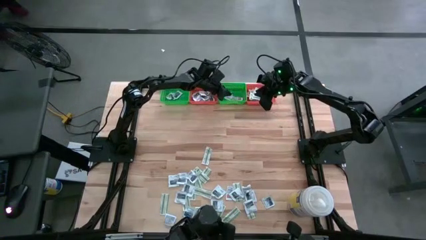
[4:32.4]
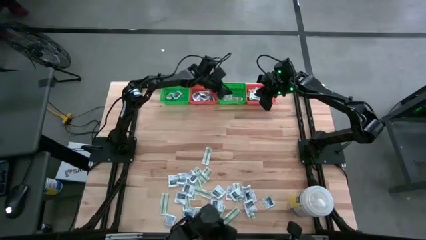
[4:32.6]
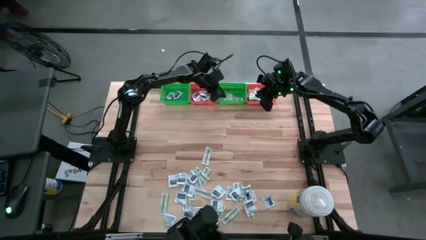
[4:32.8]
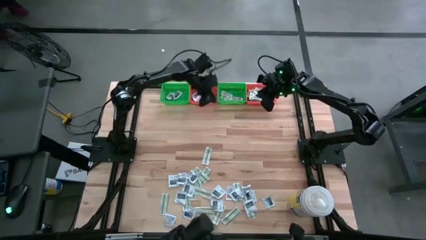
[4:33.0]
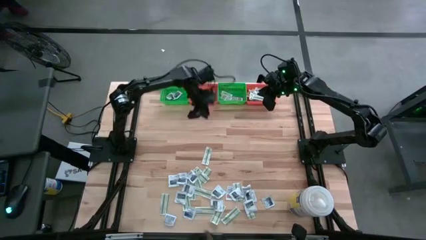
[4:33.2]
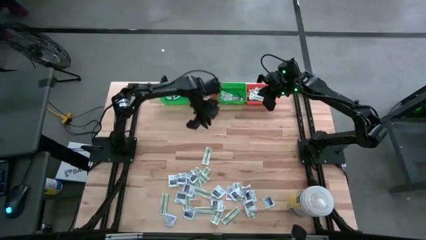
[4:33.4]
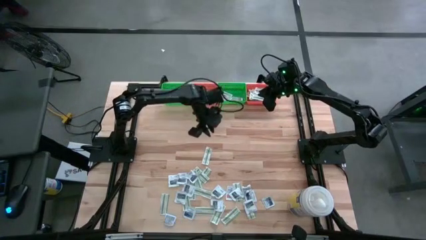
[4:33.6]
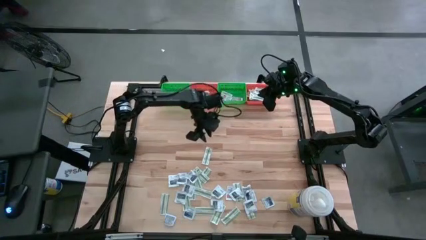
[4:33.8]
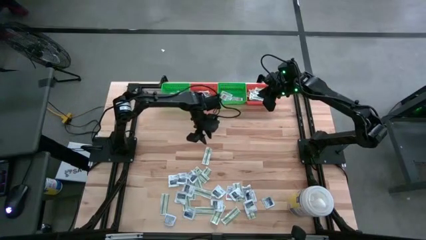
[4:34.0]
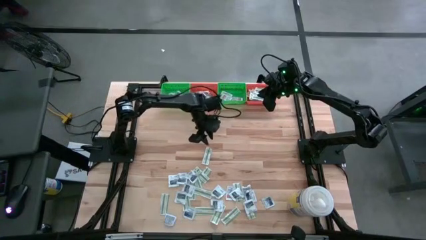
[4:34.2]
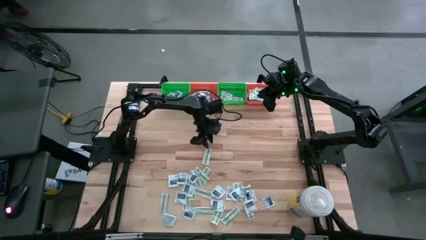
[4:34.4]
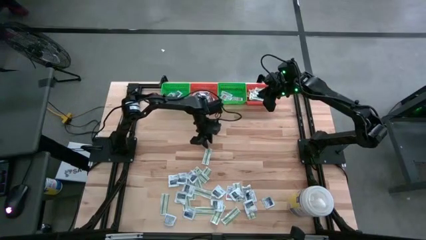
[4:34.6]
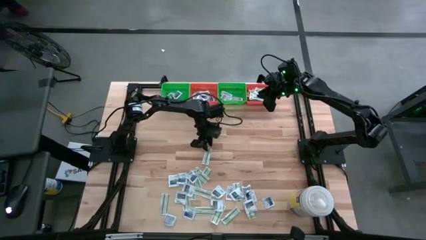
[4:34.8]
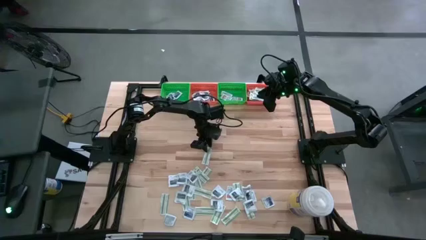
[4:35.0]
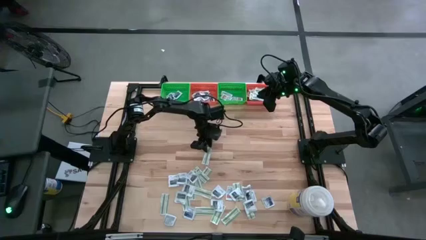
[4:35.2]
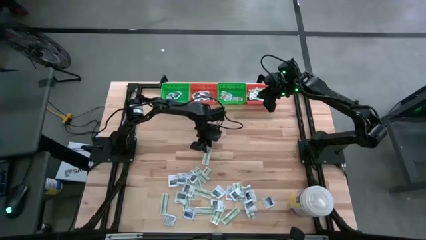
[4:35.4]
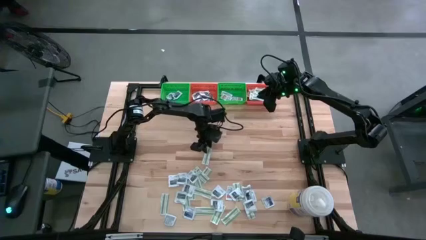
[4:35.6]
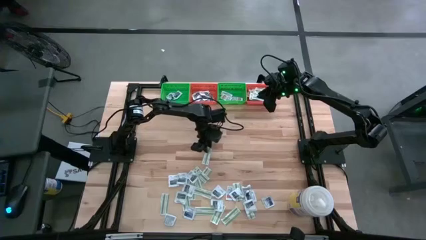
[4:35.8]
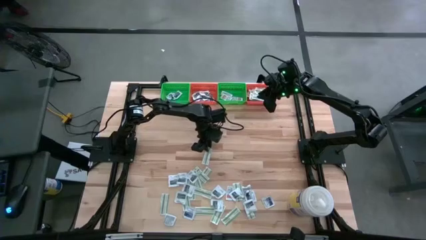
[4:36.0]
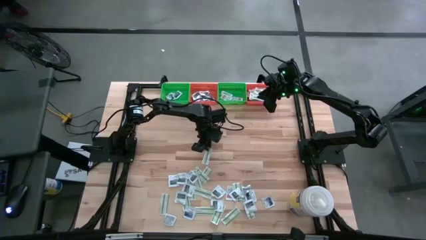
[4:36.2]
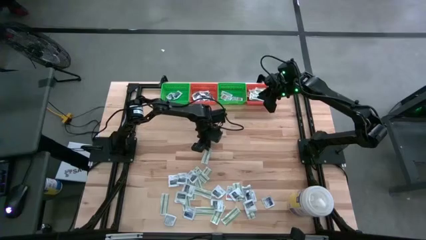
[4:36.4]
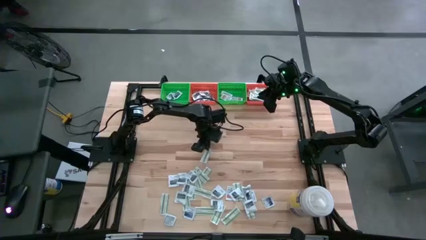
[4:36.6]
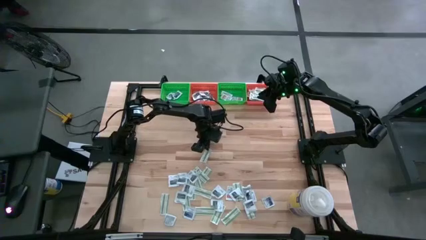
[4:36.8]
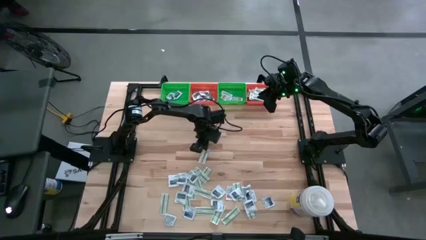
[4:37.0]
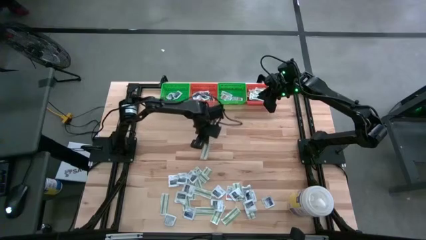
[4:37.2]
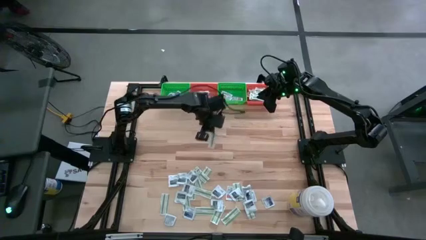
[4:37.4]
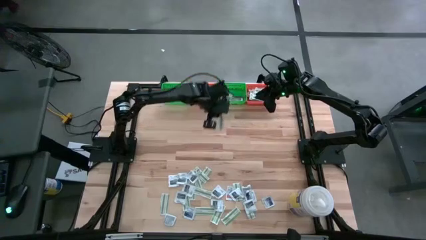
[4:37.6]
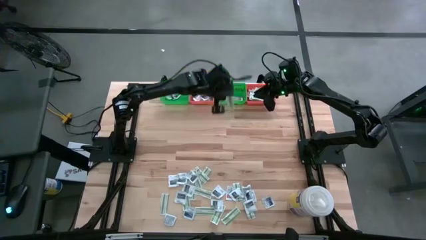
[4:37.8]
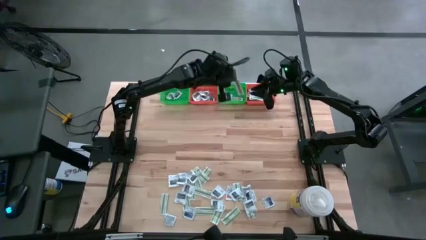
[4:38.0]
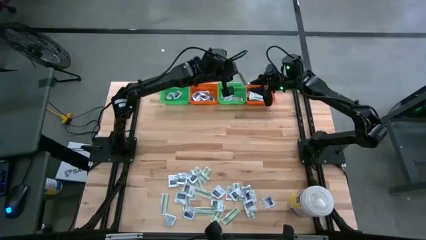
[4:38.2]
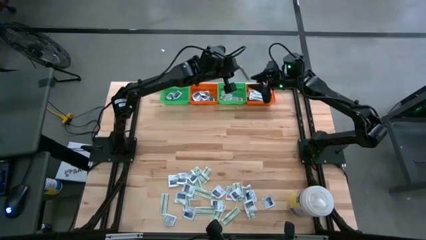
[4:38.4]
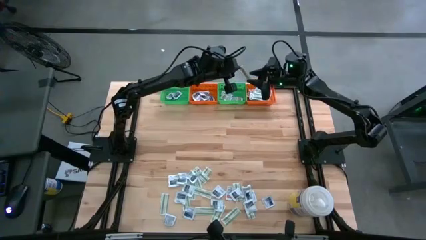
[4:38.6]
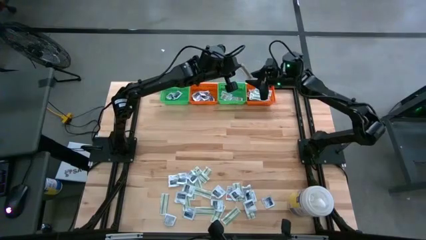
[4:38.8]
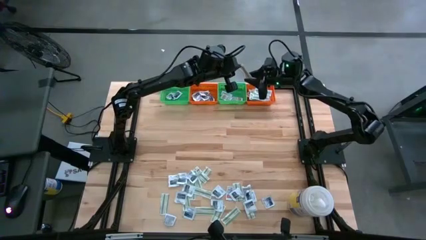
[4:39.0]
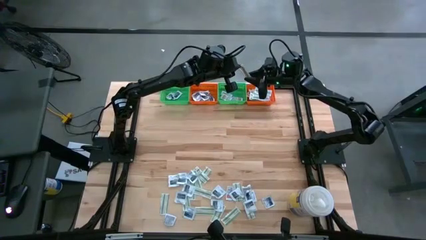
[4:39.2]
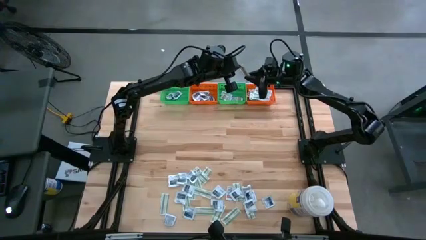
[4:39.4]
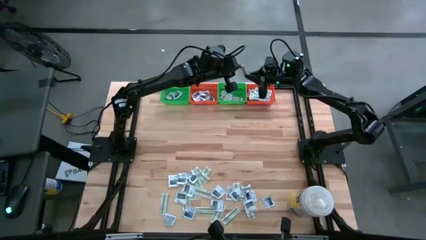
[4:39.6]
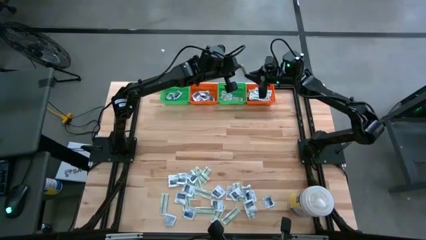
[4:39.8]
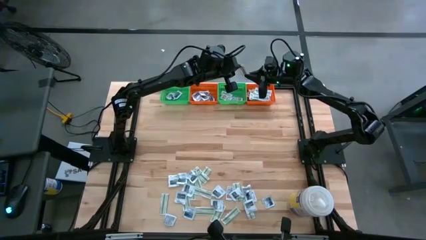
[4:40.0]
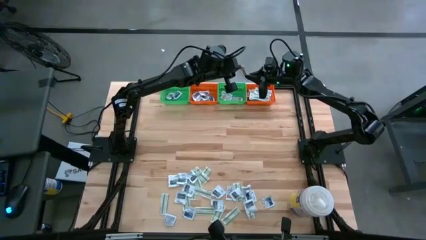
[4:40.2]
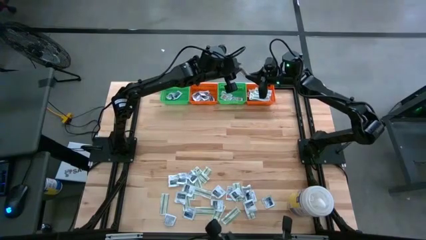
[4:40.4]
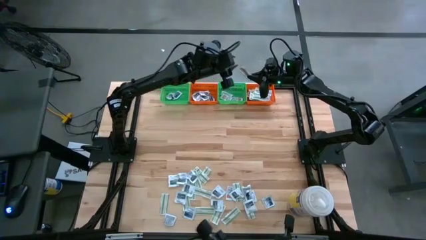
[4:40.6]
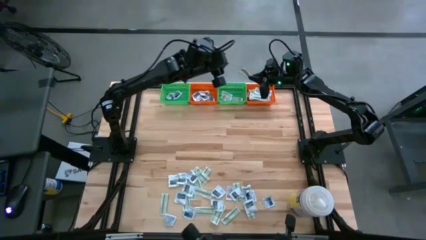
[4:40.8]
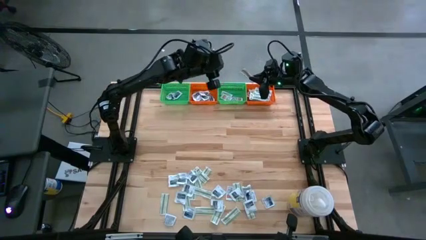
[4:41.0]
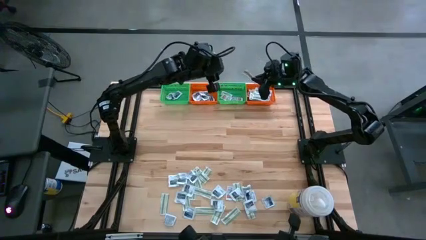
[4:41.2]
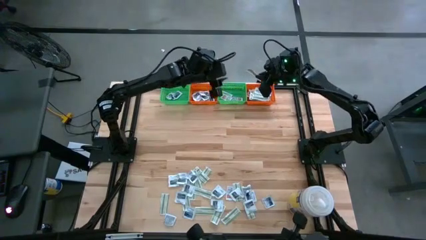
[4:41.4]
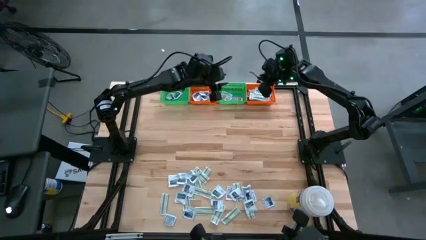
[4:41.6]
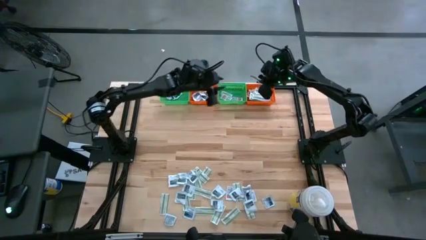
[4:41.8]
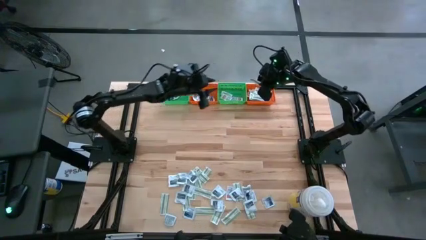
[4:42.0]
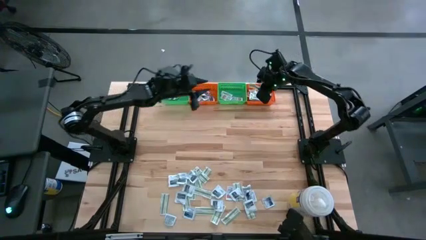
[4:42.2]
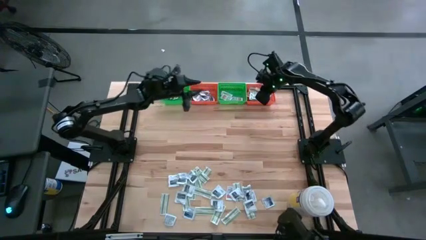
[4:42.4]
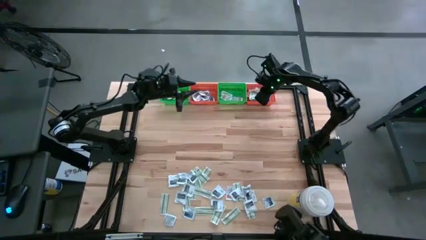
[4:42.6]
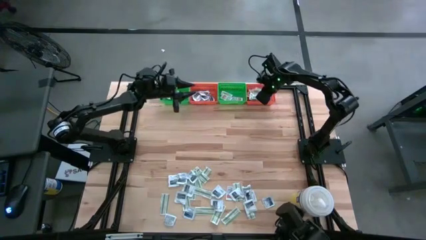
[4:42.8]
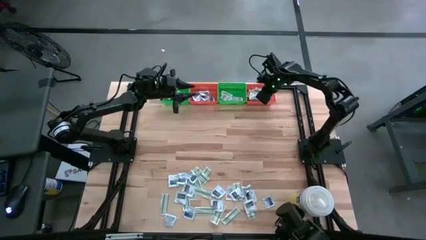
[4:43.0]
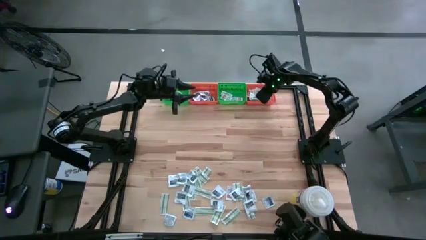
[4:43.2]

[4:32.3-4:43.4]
Task: Pick & Place First Aid Supplies
Put the green bandage pack in the right orange bin

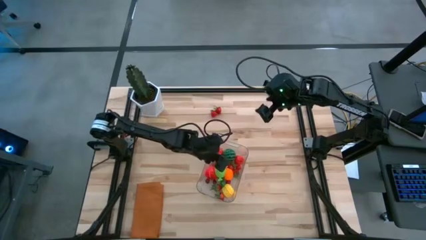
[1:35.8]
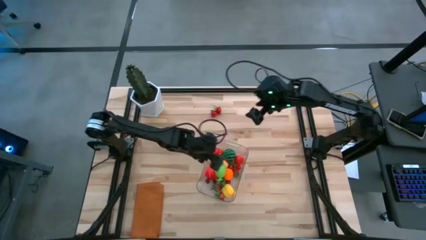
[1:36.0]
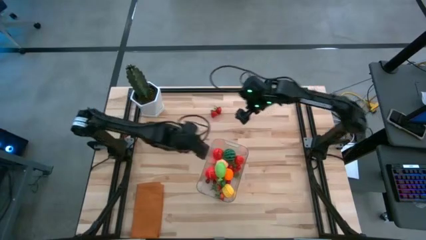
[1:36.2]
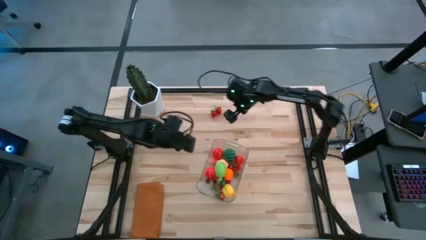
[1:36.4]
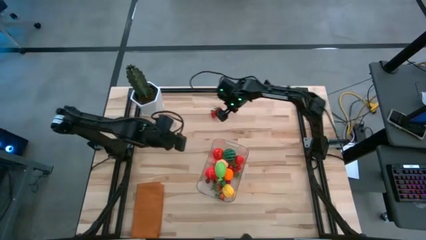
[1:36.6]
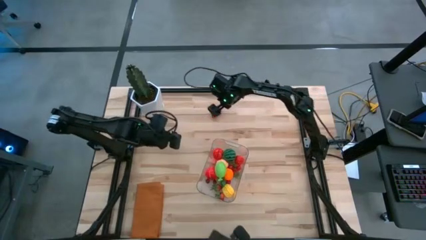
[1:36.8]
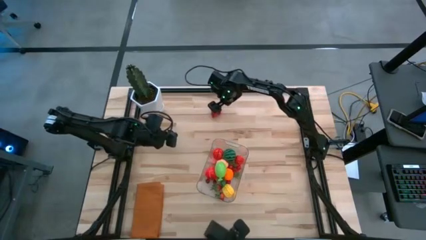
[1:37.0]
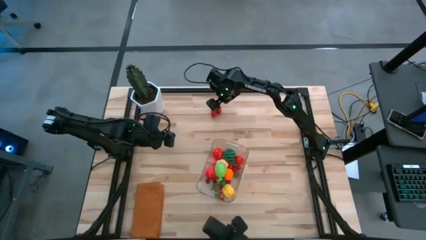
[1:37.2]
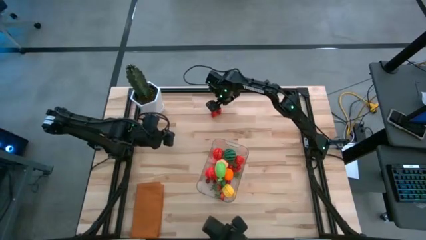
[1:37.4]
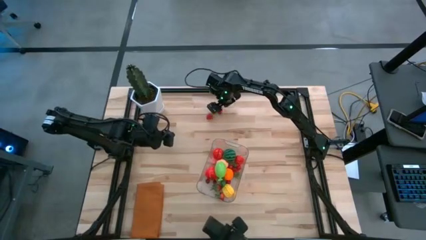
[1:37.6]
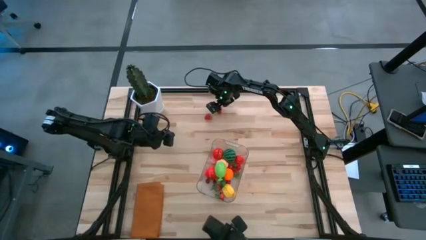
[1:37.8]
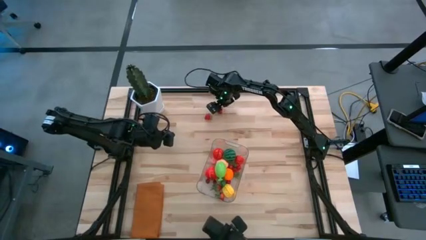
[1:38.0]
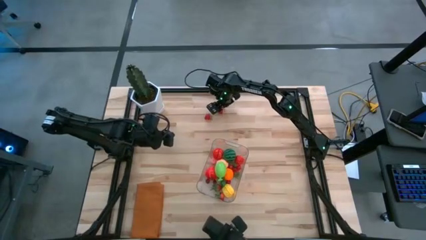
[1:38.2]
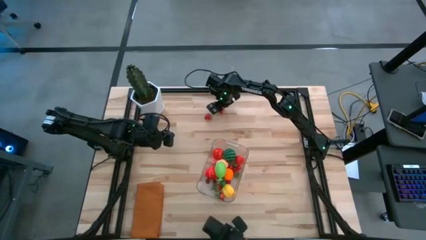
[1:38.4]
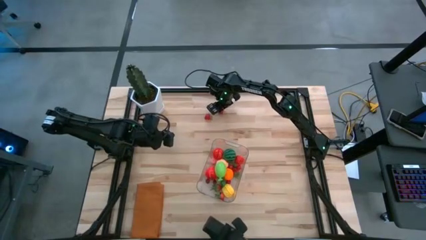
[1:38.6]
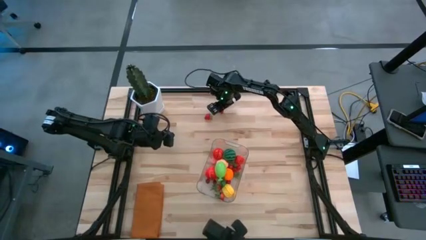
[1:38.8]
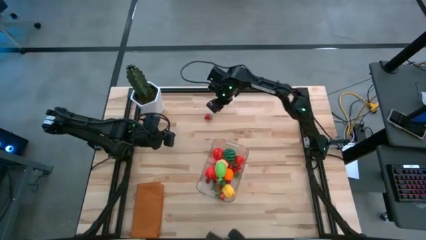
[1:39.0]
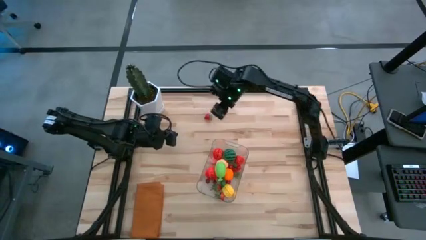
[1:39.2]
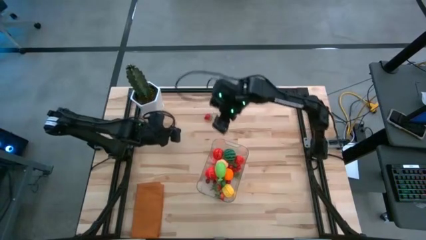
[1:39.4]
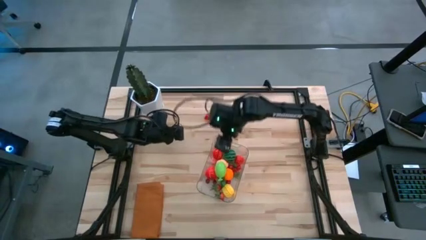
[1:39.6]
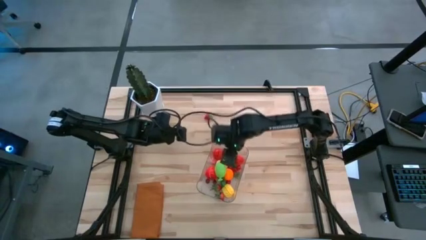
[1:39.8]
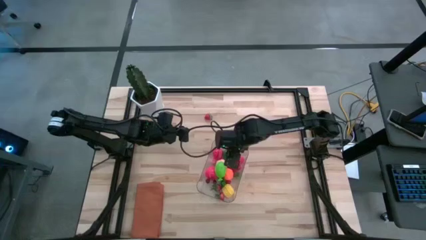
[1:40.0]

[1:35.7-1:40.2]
Task: Pick and placing Produce into tupperware
Put the red strawberry into the transparent bin

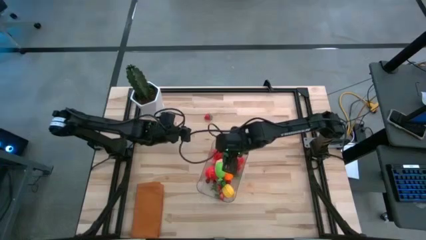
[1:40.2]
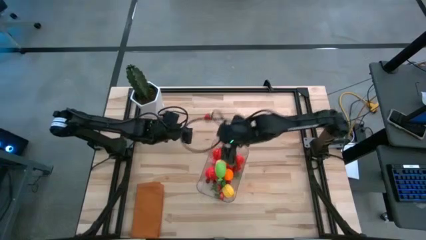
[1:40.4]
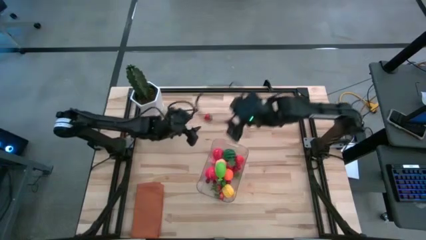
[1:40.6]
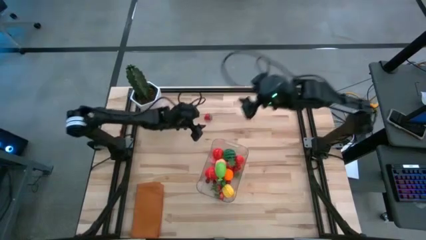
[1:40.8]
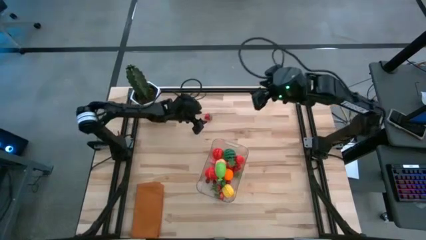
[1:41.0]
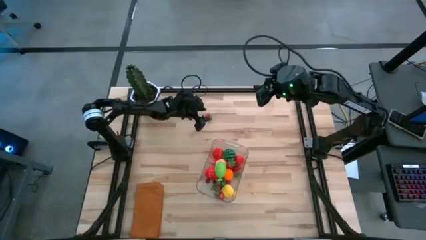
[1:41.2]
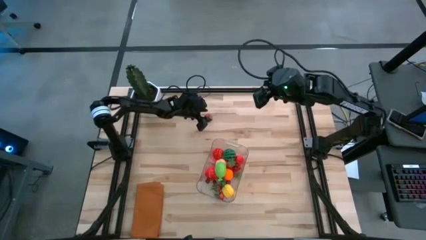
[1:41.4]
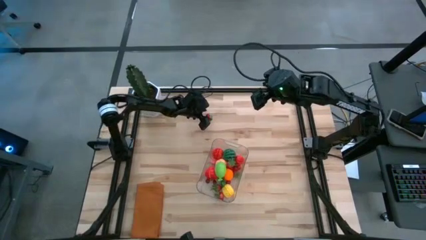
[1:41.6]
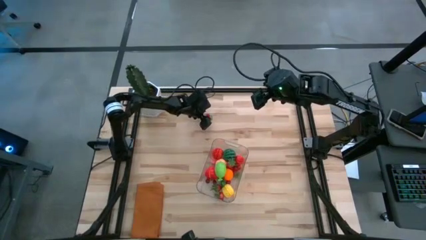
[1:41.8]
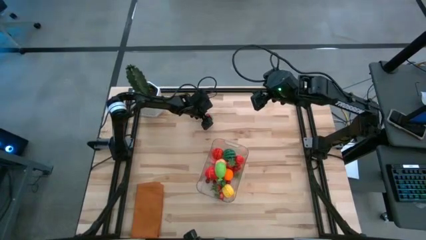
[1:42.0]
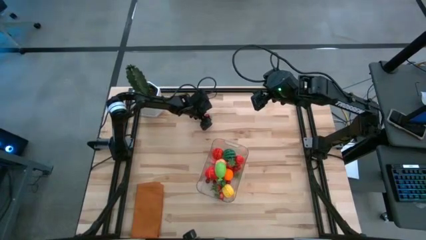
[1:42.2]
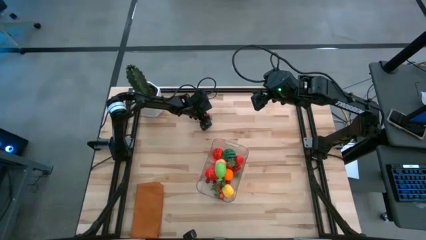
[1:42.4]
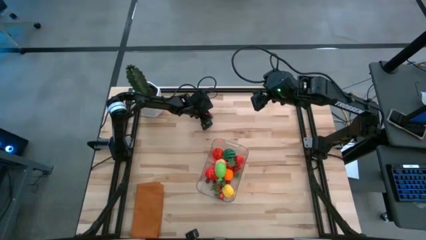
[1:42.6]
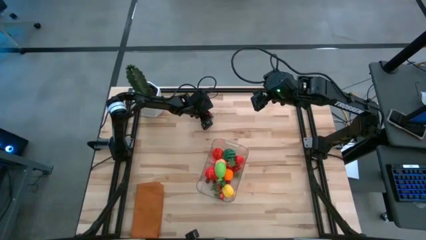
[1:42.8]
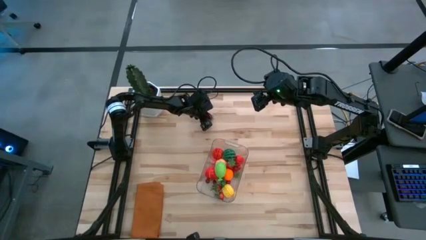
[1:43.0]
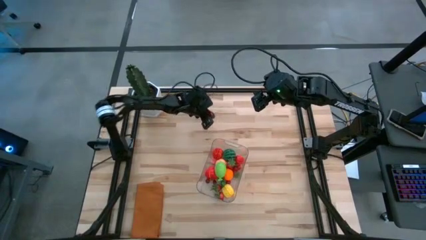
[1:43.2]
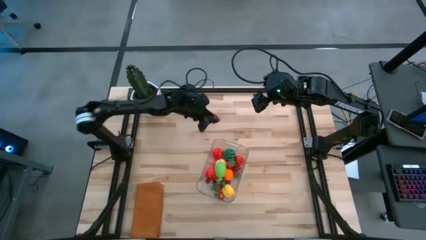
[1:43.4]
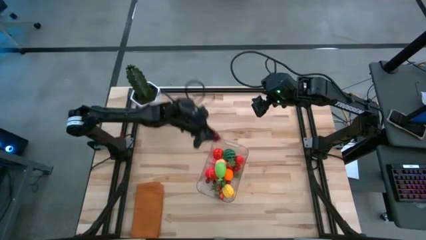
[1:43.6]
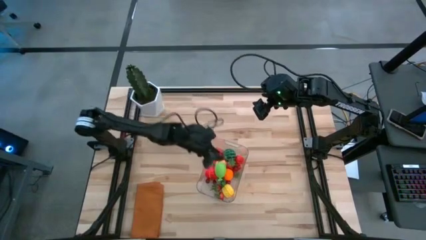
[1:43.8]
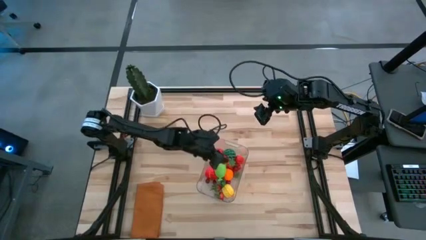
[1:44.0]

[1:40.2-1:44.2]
Put the red strawberry into the transparent bin
